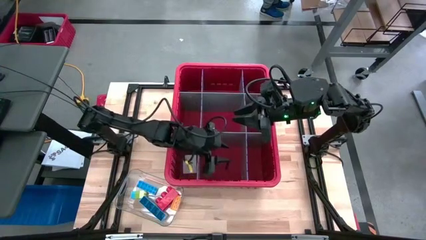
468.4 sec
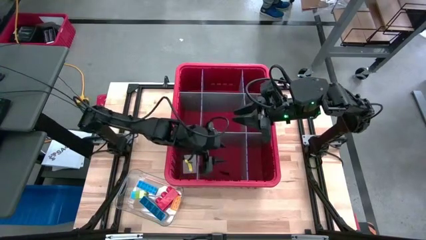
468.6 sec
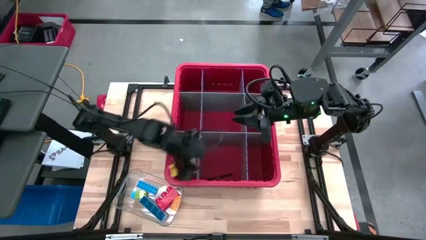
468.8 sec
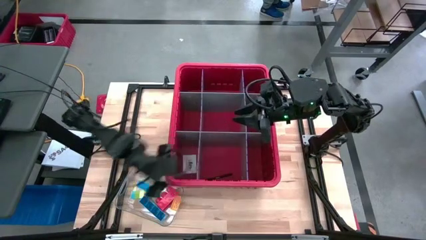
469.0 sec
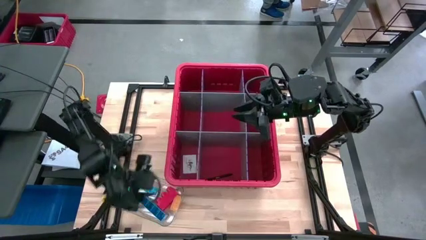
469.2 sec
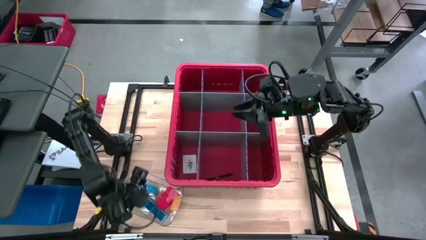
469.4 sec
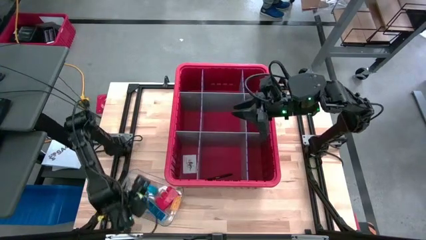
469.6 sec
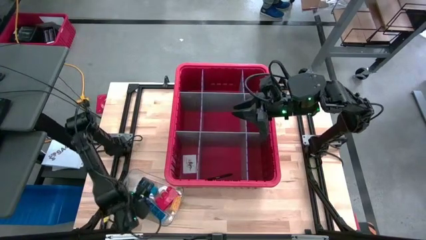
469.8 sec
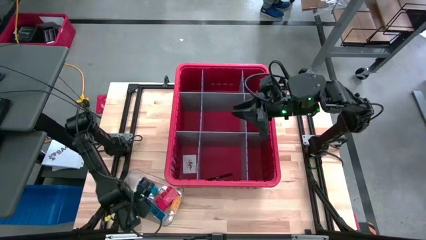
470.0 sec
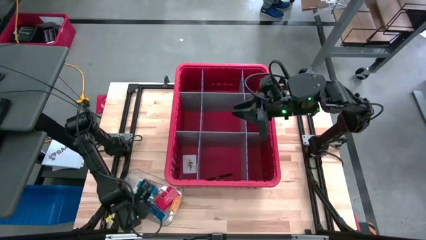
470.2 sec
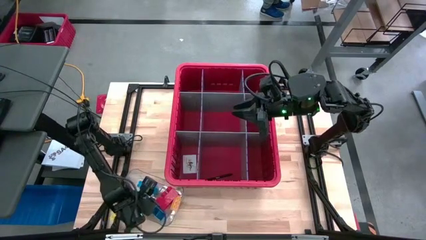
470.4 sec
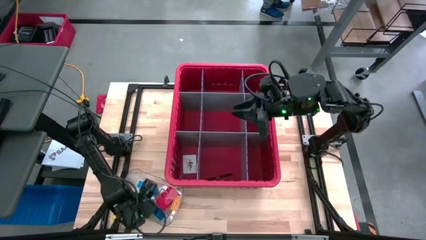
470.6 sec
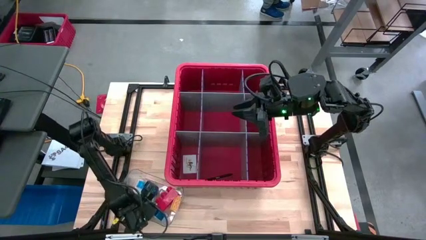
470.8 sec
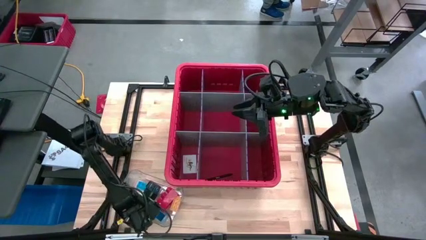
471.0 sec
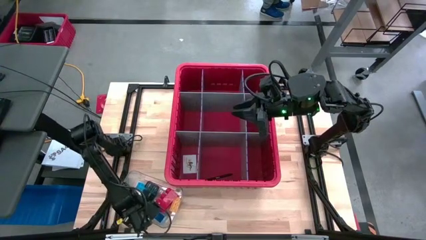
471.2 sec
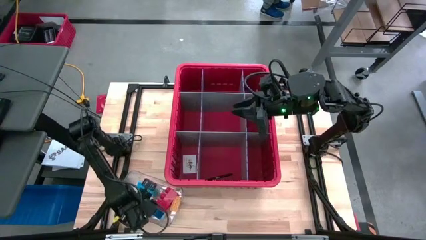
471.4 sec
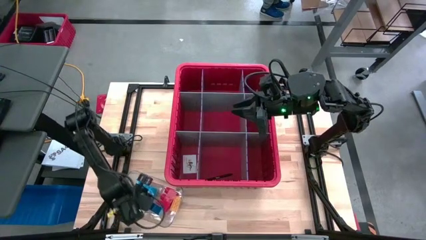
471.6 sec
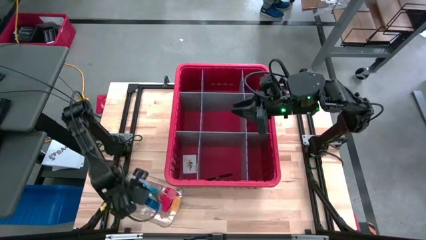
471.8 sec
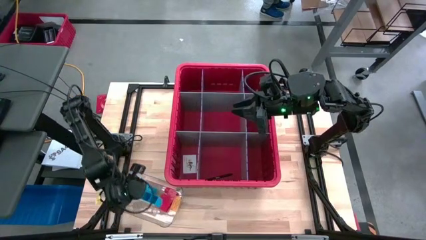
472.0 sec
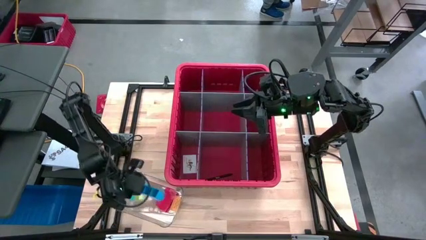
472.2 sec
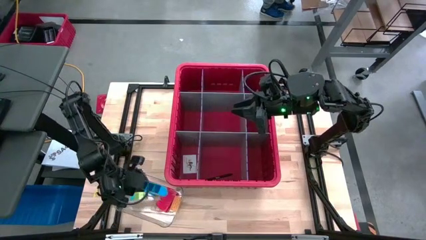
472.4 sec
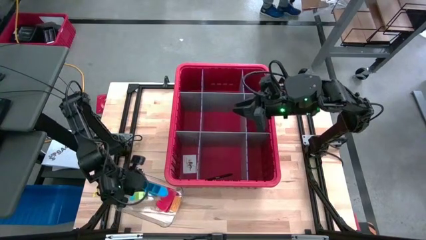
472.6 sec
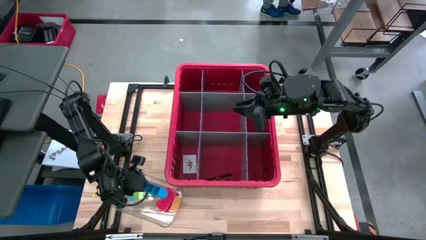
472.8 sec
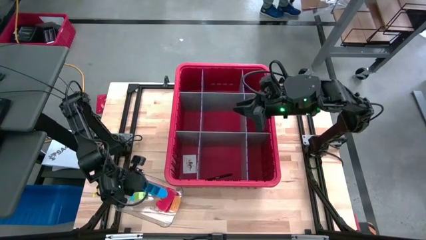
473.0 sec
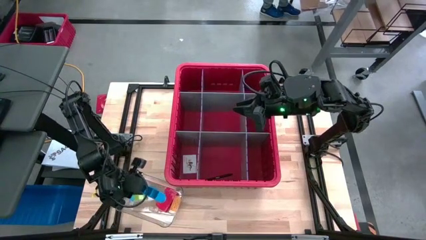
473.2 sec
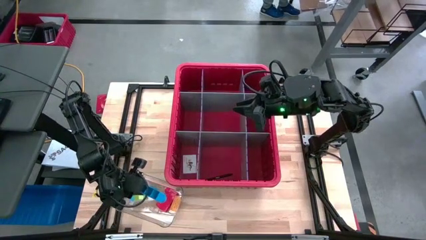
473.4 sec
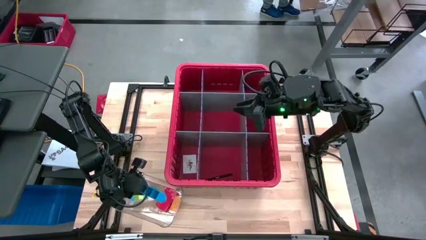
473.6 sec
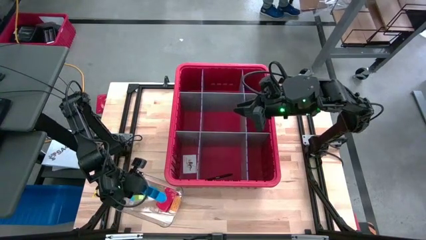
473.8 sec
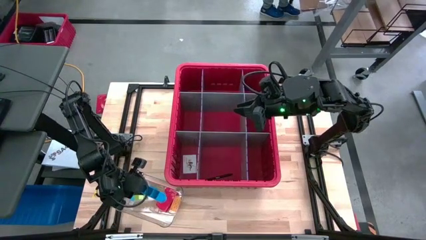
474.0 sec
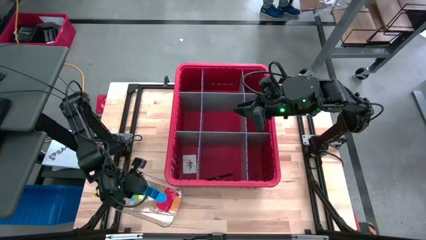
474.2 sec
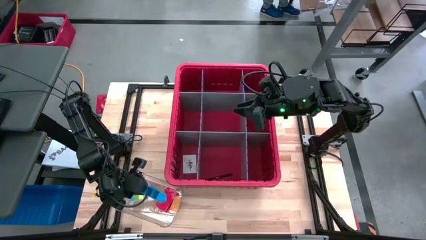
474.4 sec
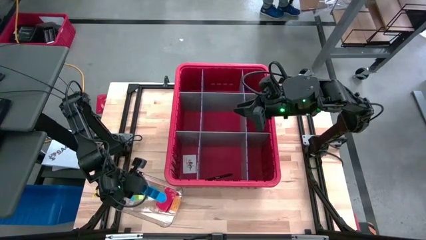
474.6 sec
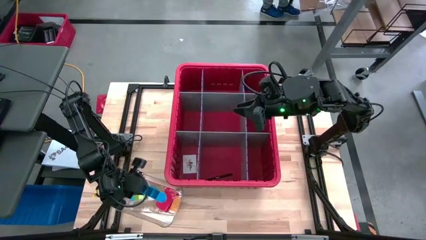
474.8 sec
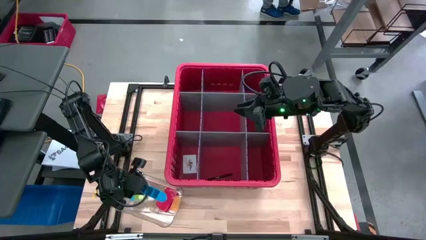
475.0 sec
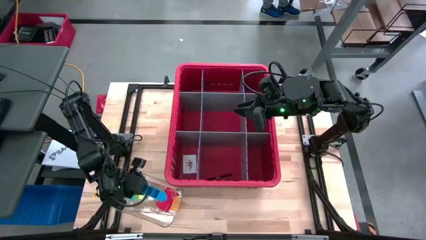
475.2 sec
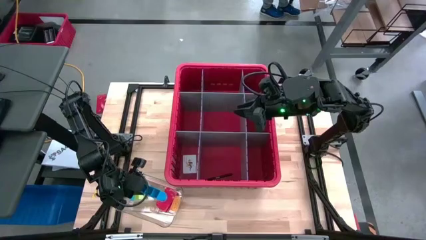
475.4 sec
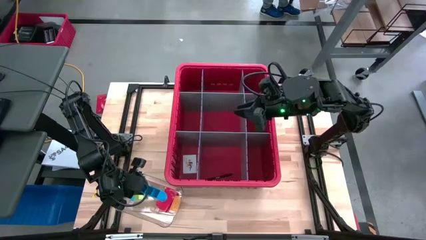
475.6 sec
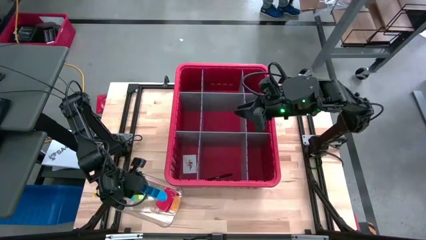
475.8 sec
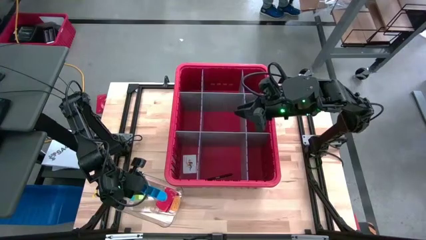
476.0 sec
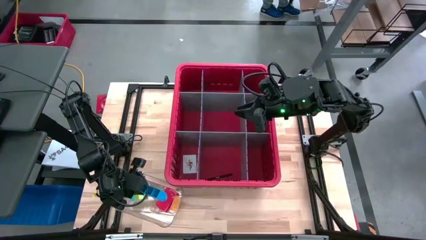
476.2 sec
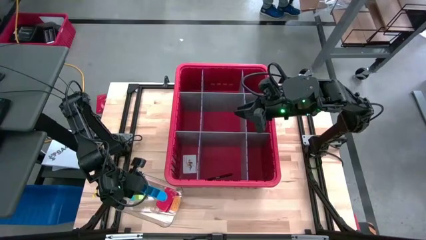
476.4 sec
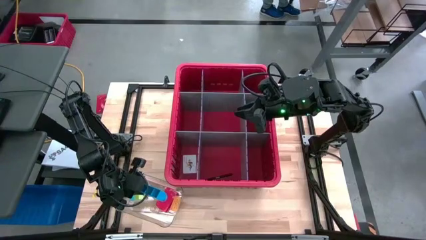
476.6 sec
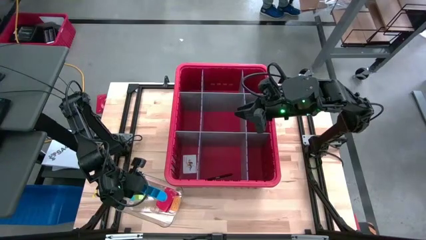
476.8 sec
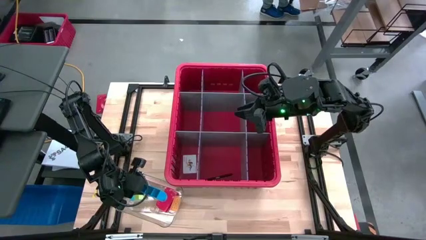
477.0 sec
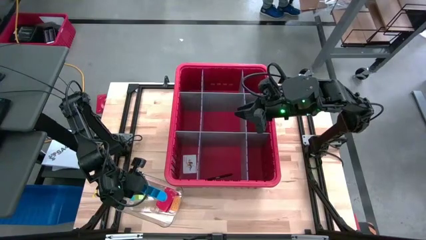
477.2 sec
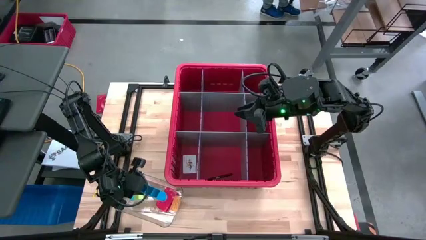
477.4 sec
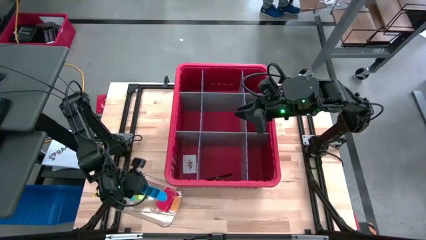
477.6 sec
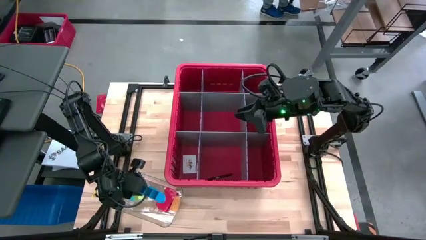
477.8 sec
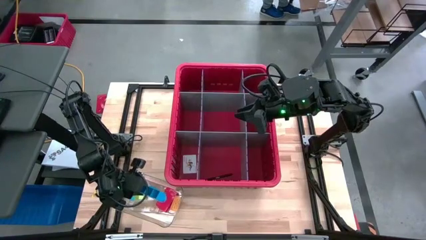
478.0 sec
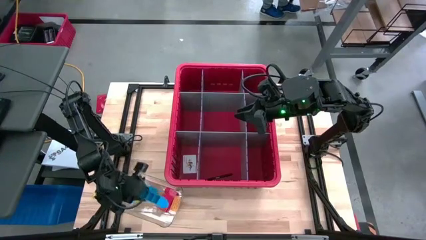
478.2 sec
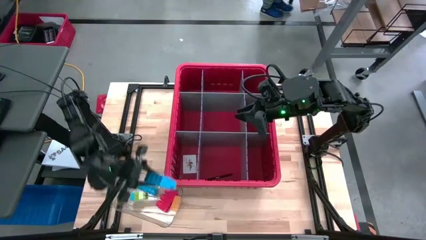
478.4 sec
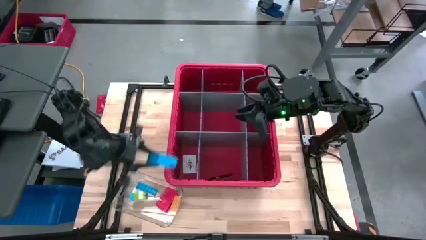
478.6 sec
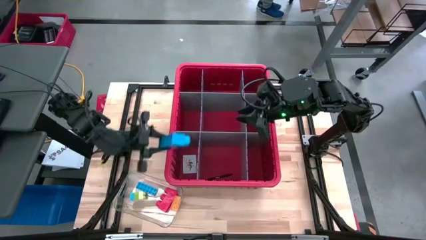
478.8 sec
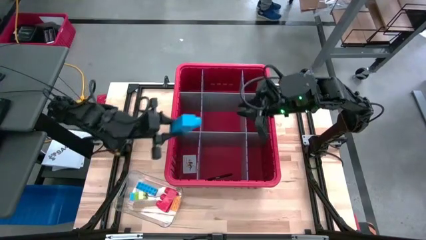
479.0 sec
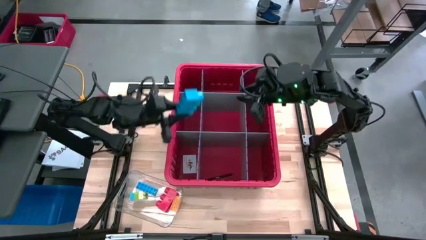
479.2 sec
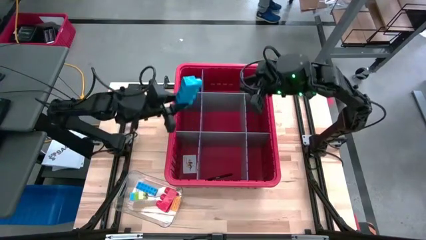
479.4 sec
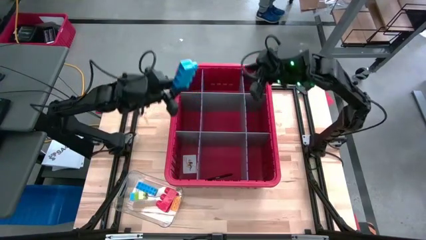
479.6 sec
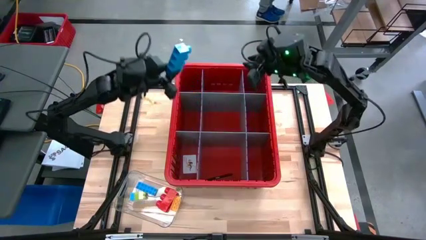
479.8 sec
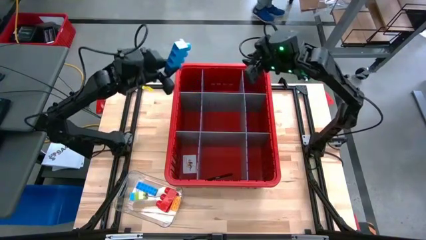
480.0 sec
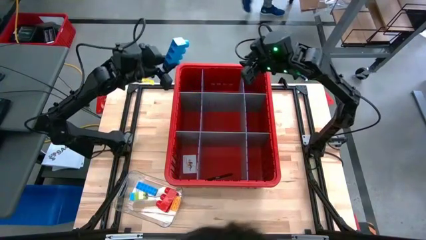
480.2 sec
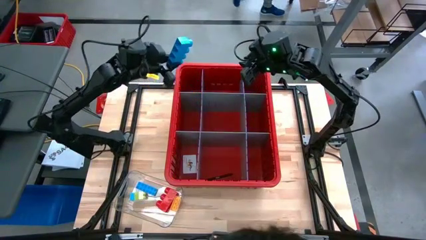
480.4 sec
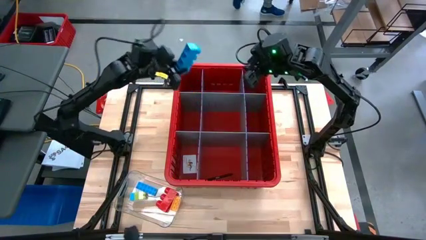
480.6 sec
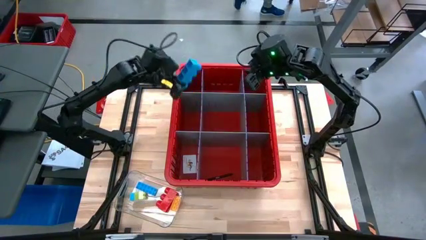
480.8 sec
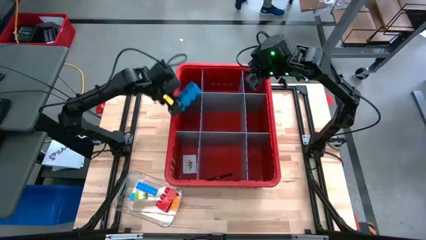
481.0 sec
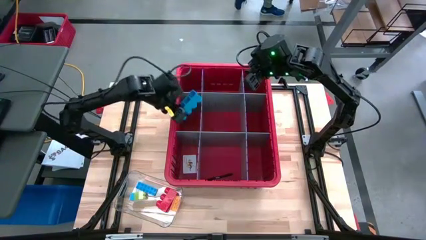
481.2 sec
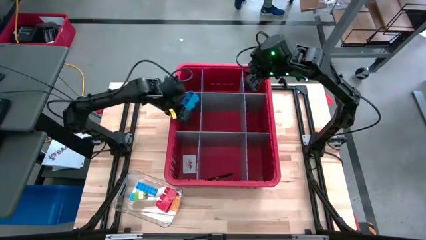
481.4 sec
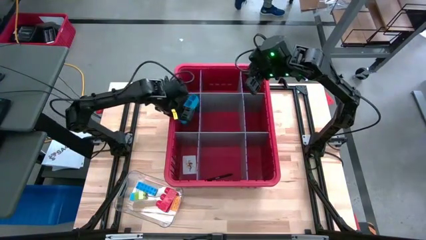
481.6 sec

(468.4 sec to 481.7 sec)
Task: Sort blocks
Put the blue block into the bin

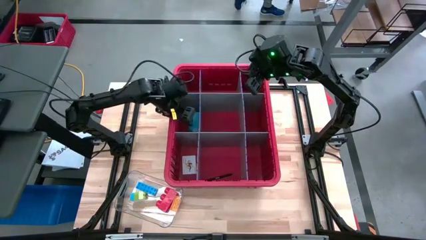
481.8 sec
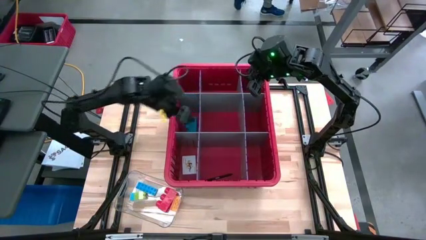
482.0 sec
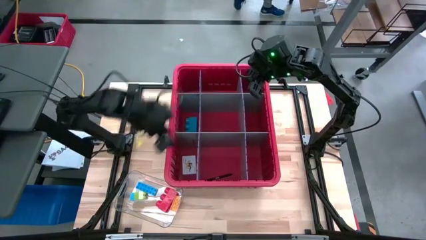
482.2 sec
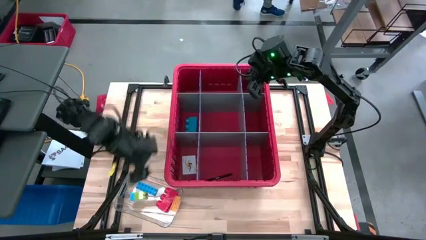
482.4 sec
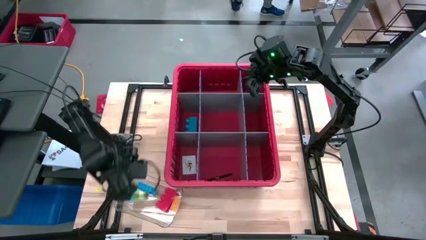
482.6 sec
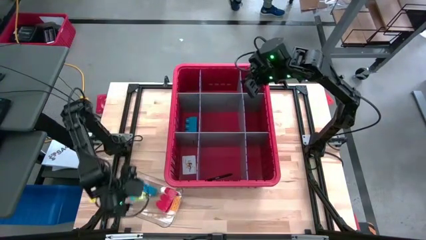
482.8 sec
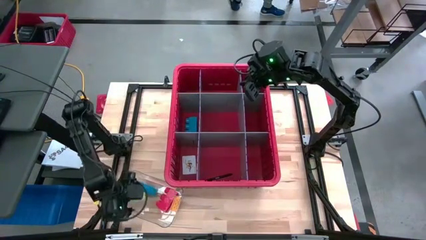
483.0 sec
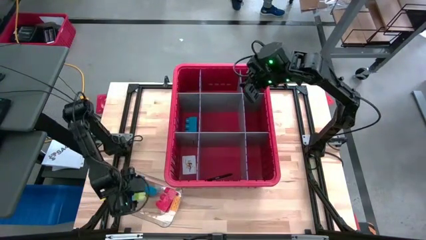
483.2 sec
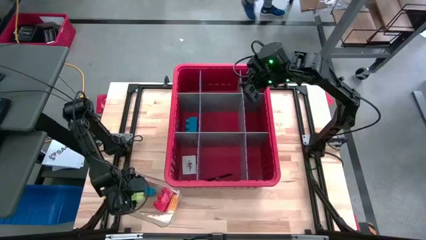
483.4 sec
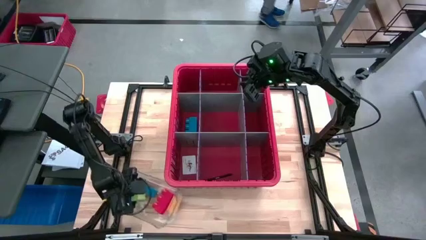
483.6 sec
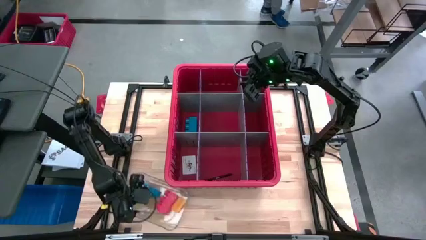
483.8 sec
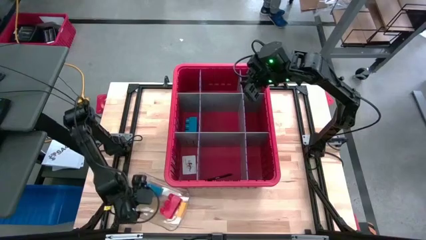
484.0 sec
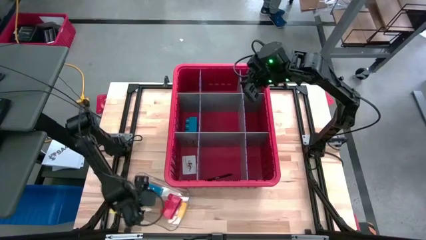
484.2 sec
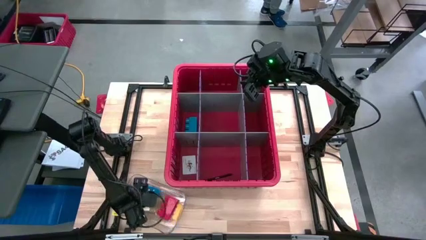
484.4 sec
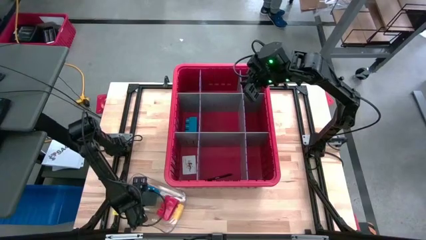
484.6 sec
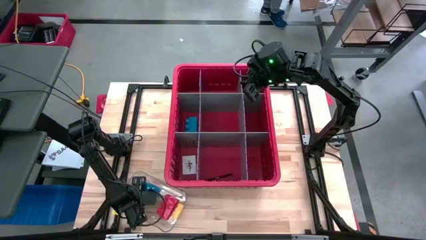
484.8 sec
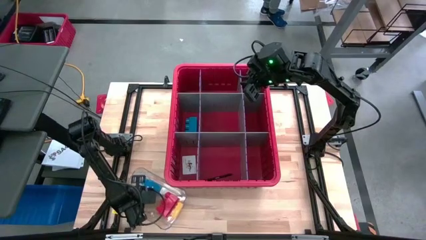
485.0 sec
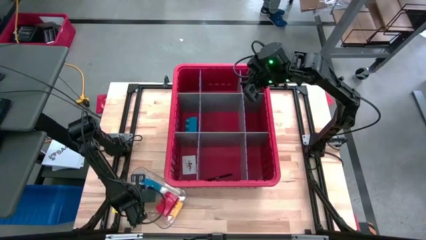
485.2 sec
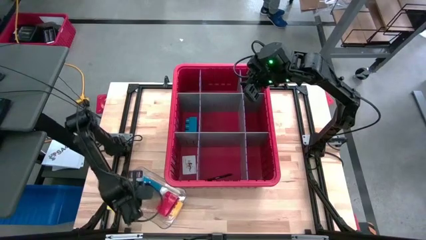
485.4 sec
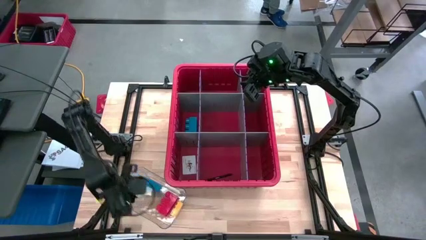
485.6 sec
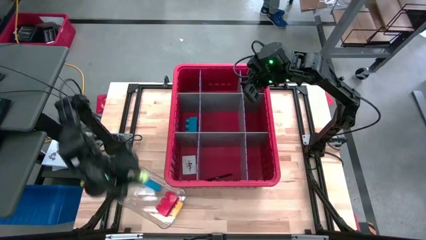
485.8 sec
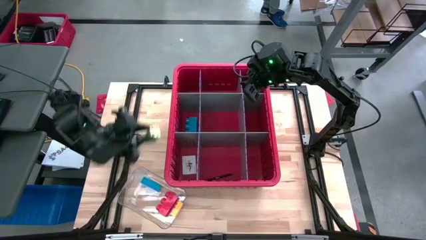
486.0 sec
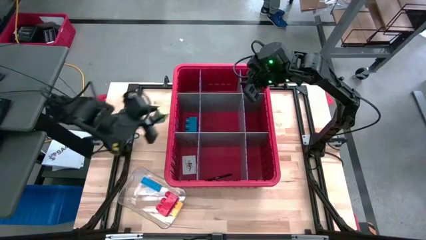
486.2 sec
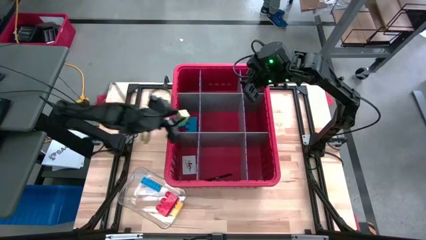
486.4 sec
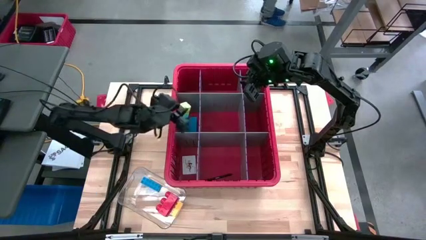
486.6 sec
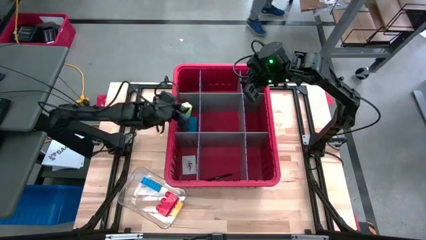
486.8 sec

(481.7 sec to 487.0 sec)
Put the green block into the bin
